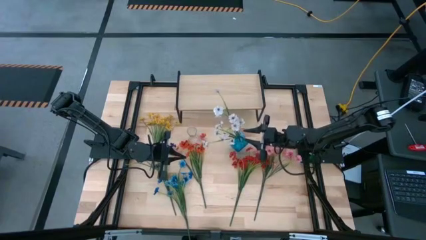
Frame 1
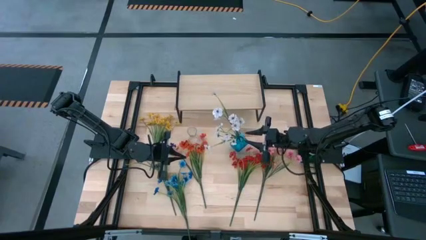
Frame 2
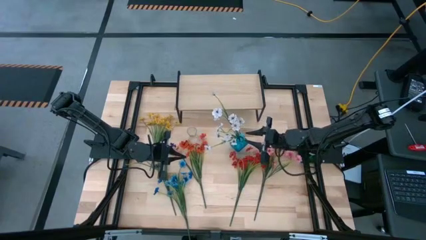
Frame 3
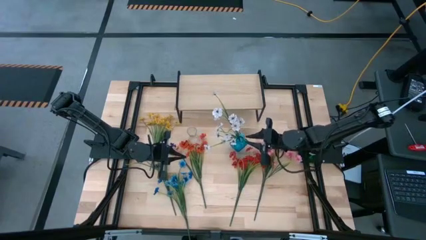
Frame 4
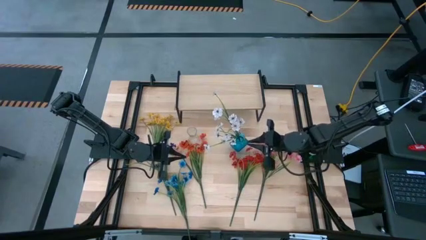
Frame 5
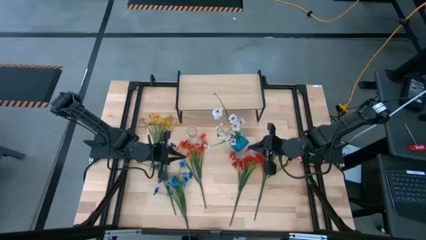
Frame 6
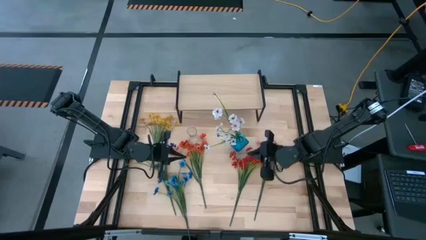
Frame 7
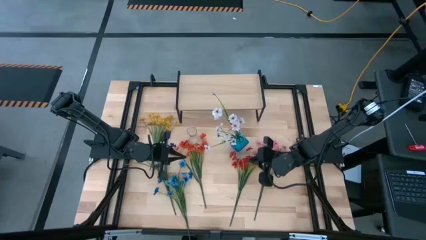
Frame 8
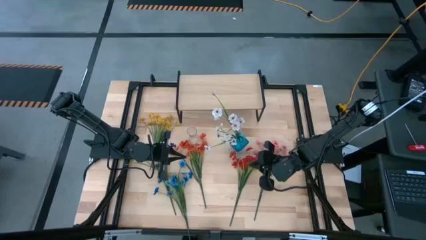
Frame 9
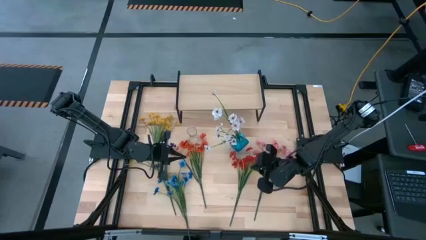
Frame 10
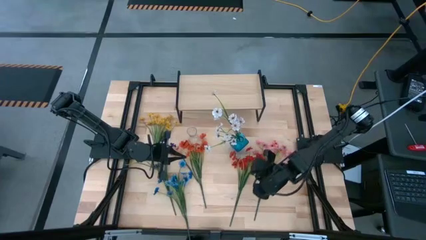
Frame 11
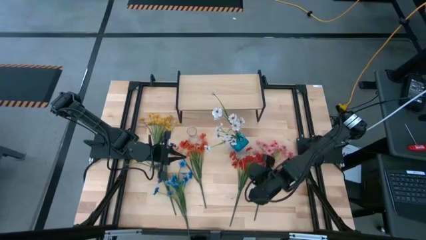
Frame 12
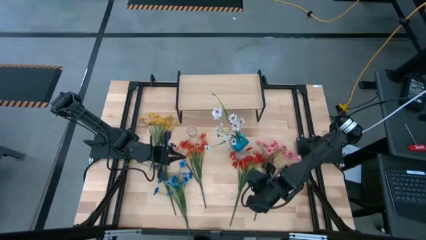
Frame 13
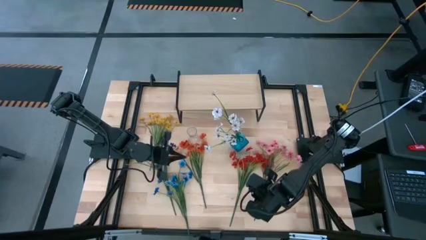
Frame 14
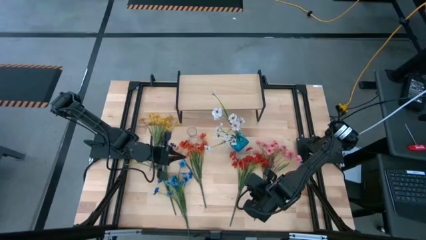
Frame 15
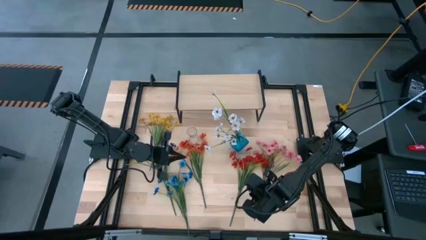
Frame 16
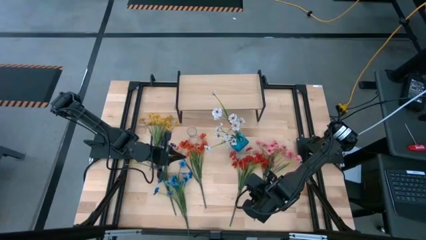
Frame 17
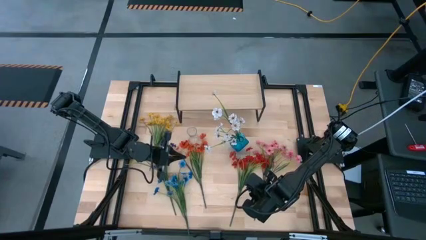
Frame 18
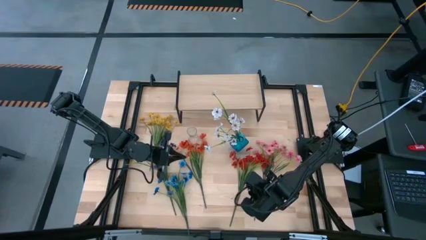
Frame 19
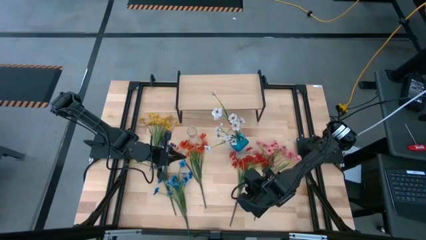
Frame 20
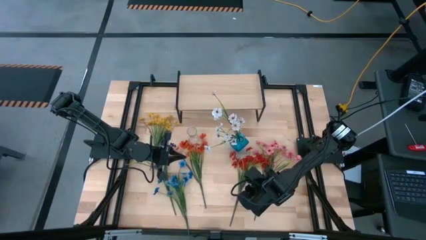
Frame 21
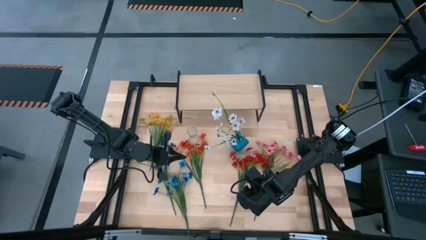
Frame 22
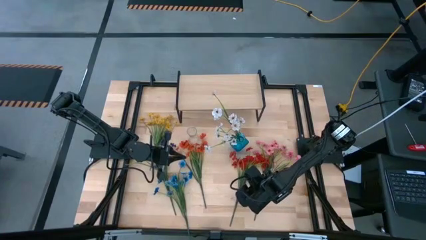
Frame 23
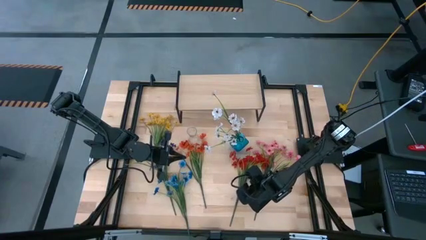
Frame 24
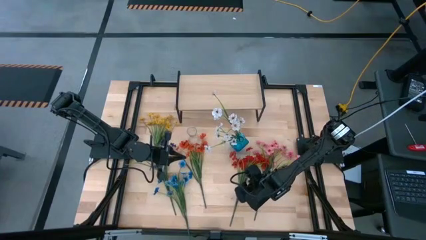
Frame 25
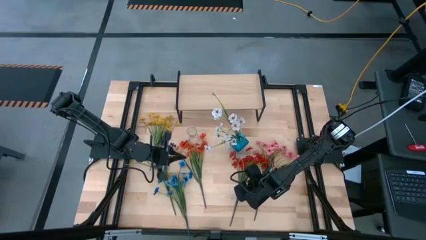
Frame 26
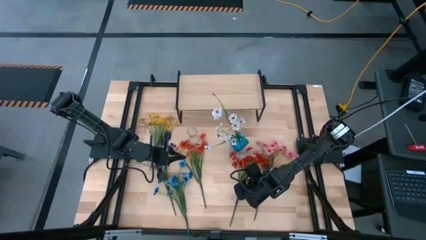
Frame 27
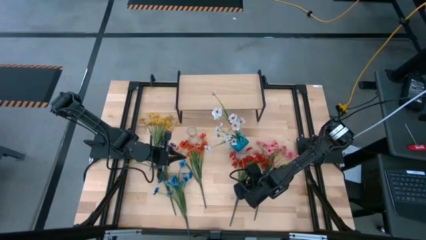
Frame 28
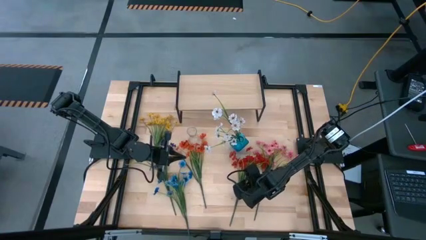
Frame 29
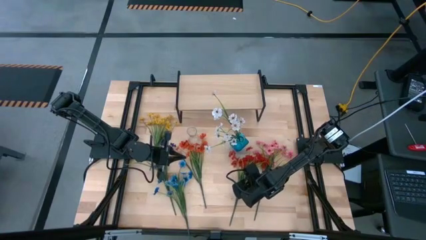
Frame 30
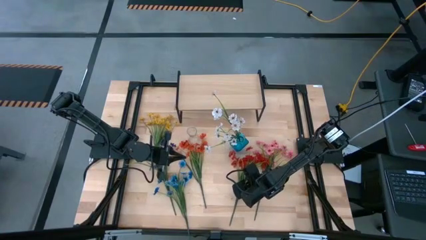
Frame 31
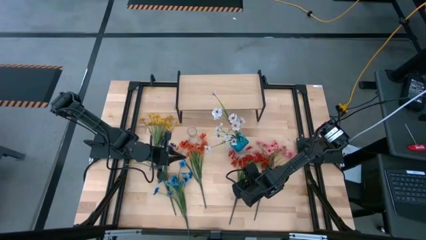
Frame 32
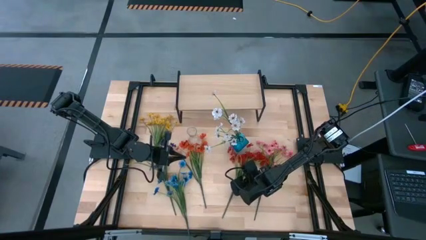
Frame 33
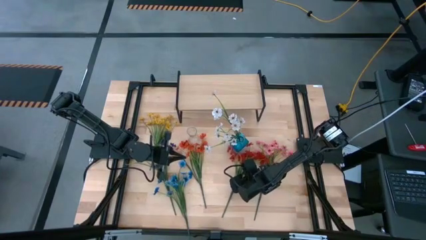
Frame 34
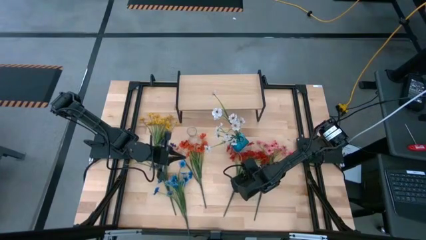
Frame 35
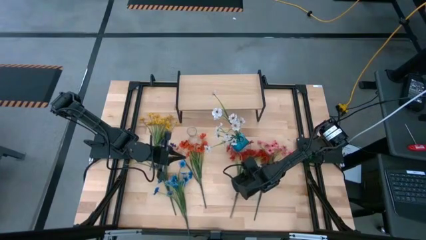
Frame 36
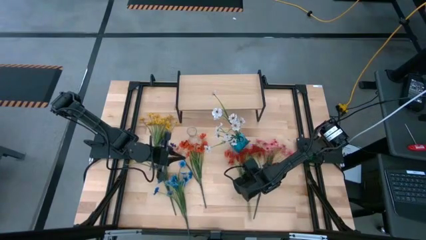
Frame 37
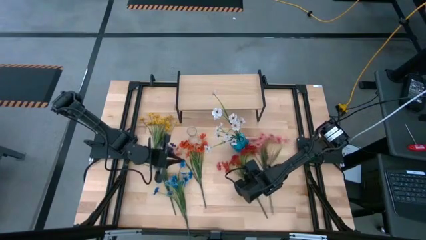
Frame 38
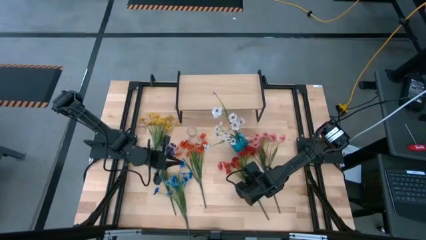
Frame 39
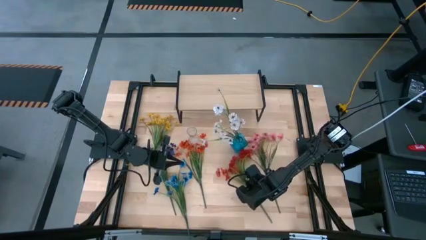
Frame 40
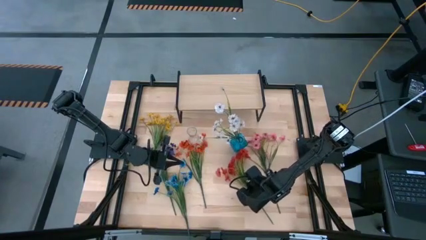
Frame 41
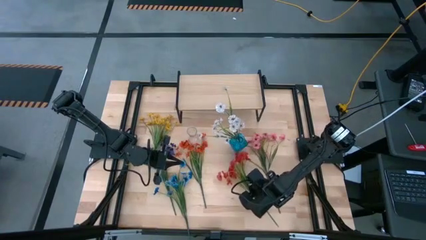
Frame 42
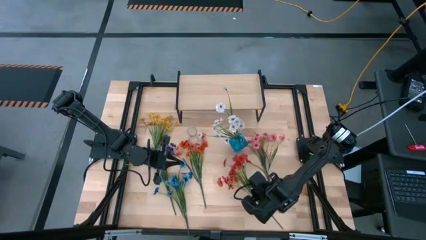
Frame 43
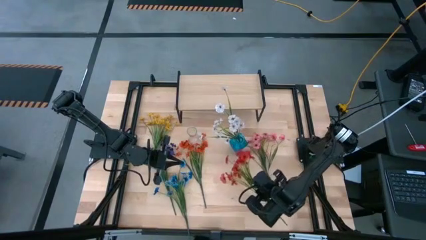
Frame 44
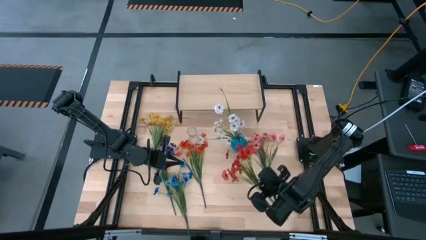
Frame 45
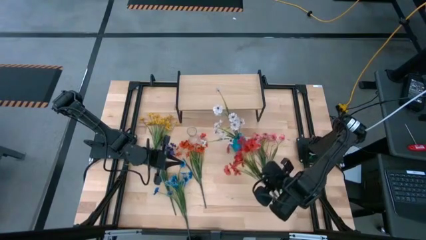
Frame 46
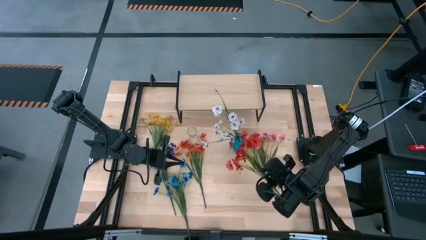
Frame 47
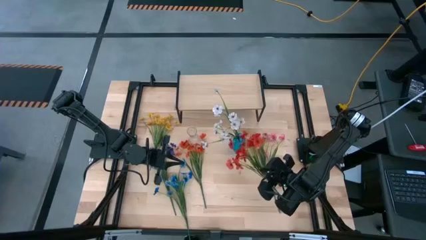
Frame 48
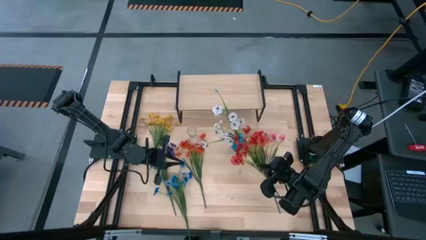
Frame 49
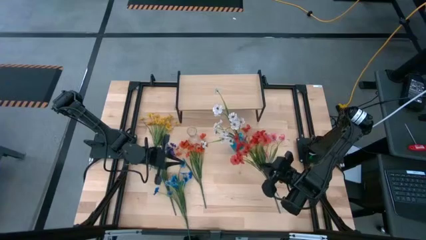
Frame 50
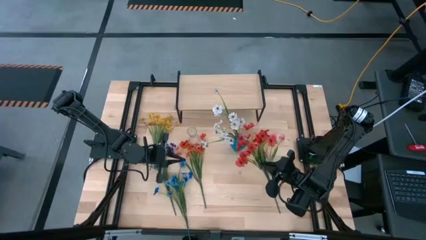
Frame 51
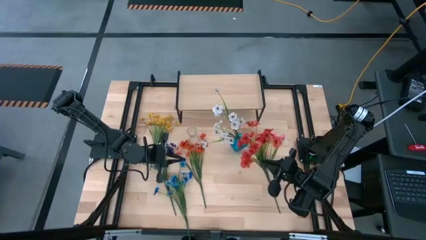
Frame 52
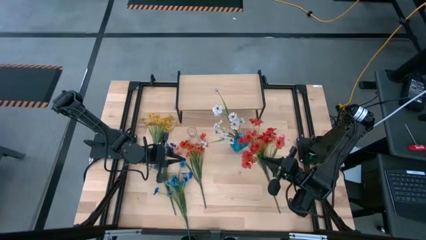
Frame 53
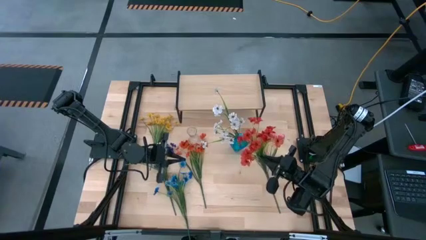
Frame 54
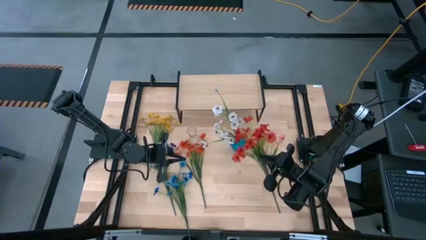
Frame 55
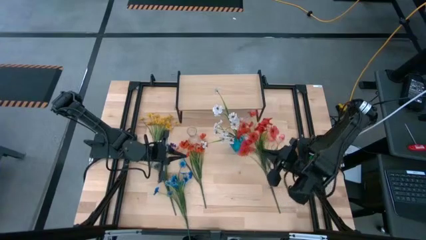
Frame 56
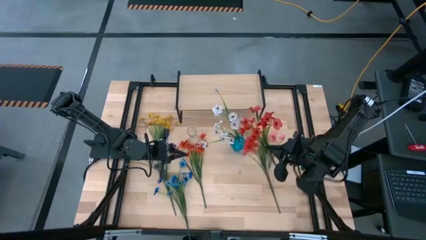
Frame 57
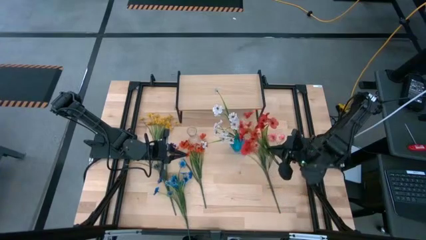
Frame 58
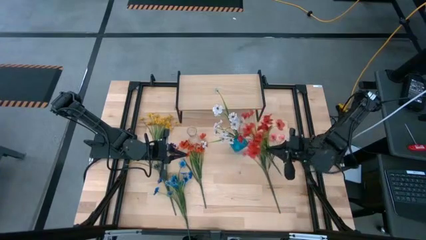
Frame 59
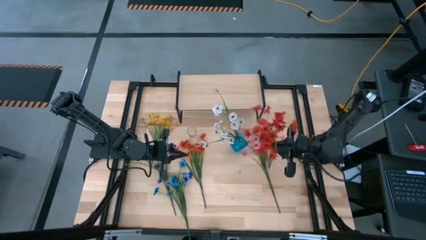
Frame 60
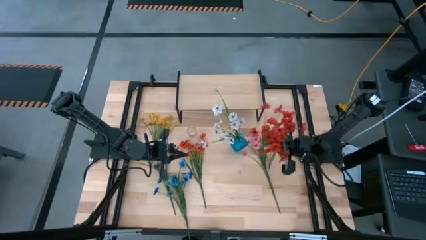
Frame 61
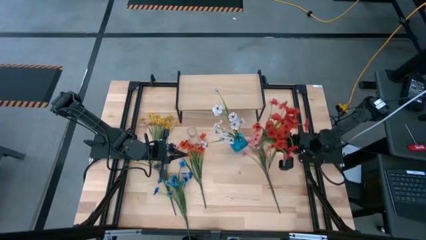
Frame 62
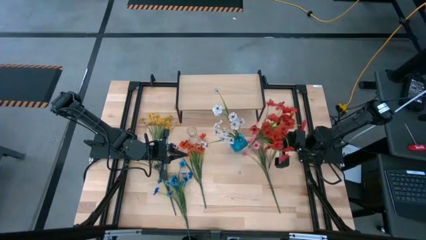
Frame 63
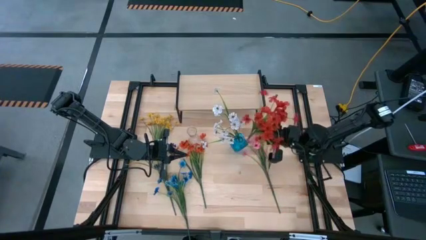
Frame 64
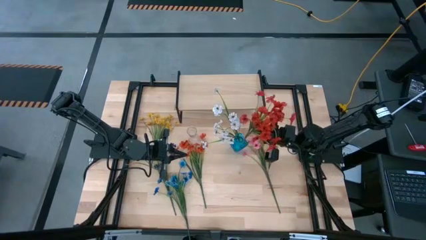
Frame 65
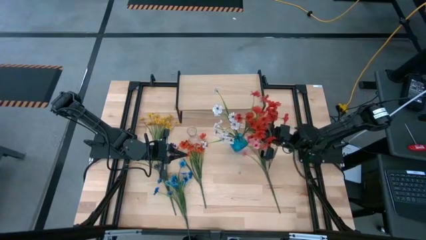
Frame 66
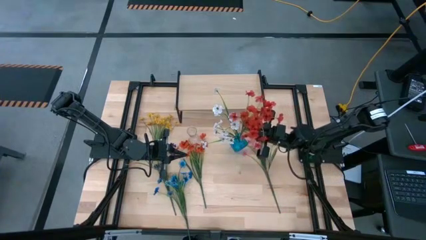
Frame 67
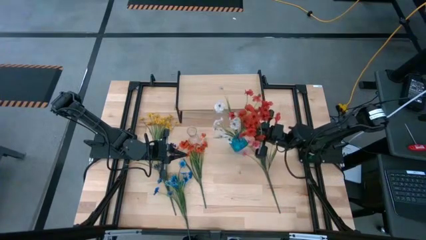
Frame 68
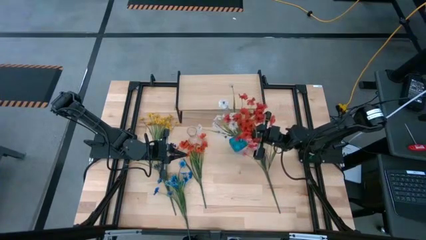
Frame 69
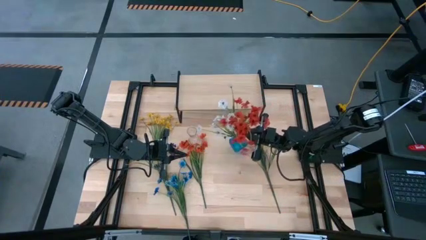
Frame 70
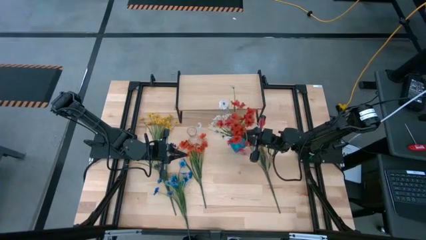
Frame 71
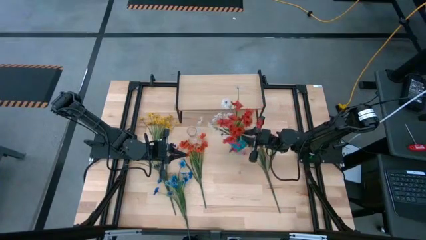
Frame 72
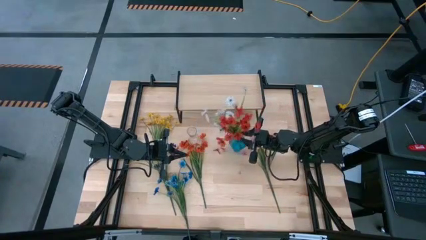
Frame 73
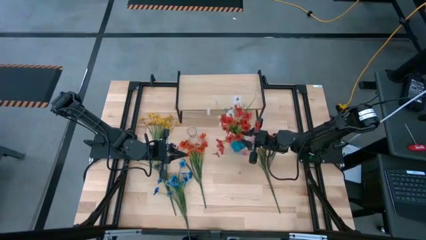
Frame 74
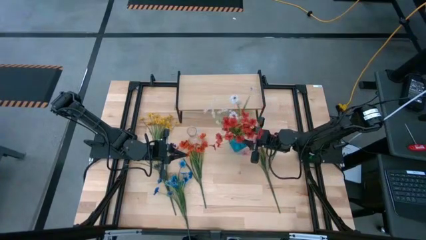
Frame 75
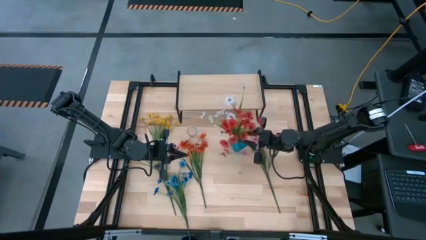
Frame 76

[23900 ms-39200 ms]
Task: Pick and place flowers into a vace then onto a shelf
Put the red flowers into the blue vase
